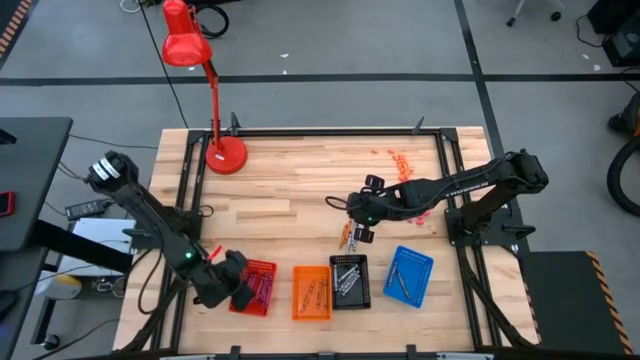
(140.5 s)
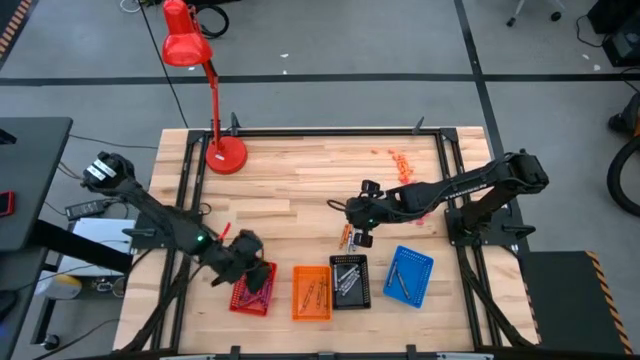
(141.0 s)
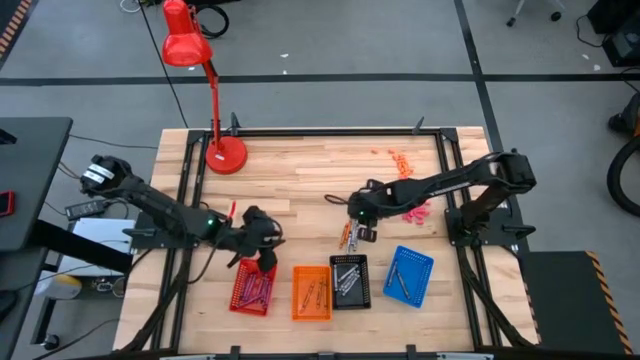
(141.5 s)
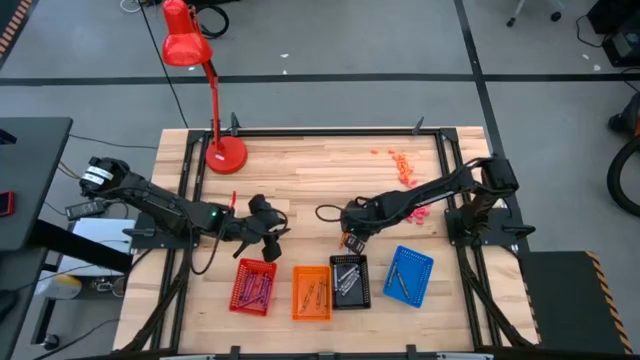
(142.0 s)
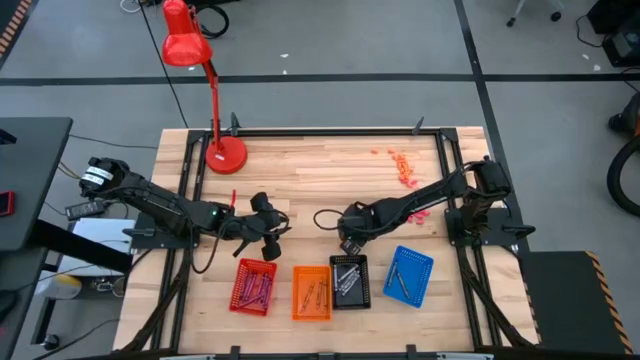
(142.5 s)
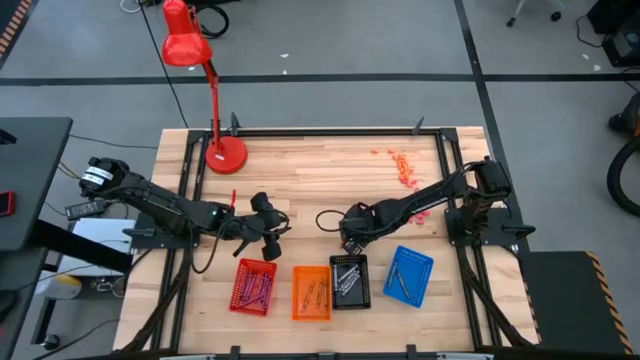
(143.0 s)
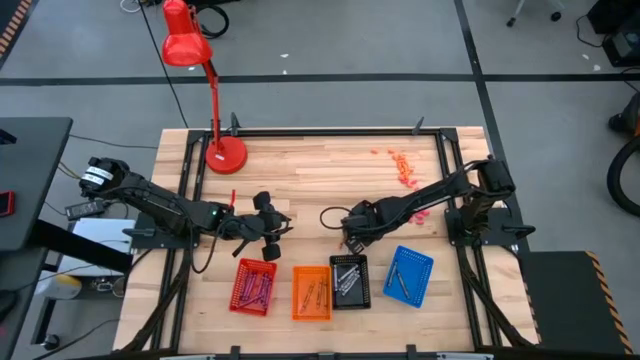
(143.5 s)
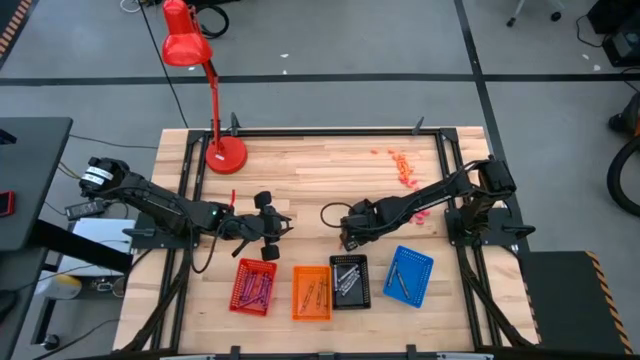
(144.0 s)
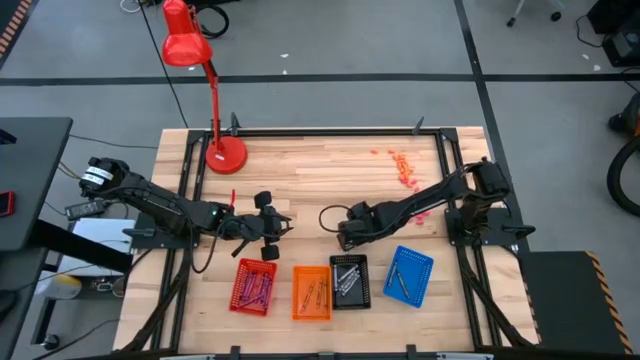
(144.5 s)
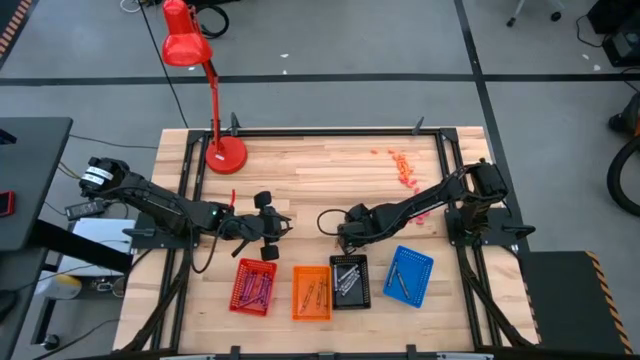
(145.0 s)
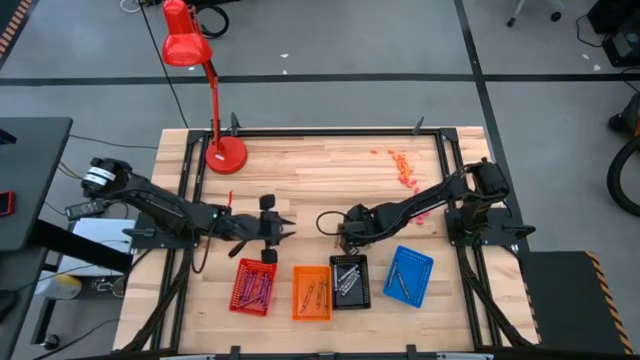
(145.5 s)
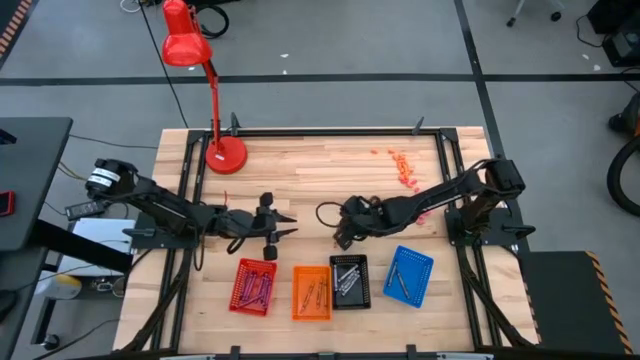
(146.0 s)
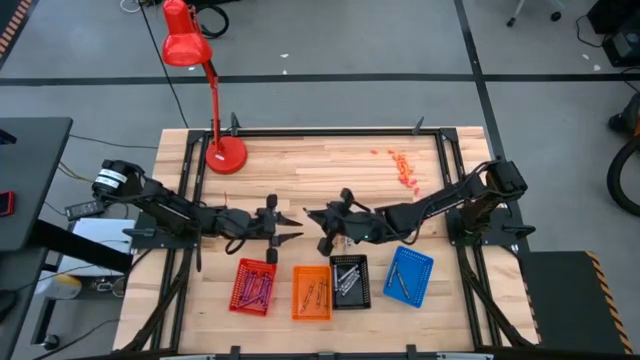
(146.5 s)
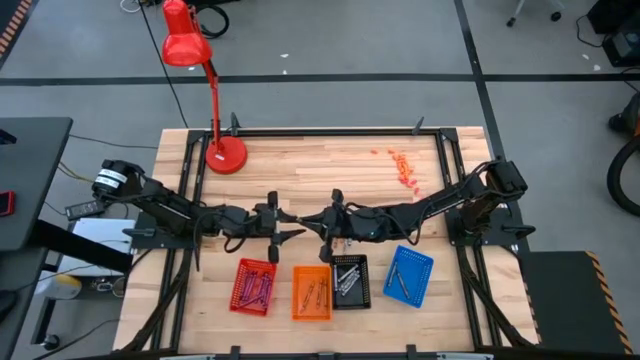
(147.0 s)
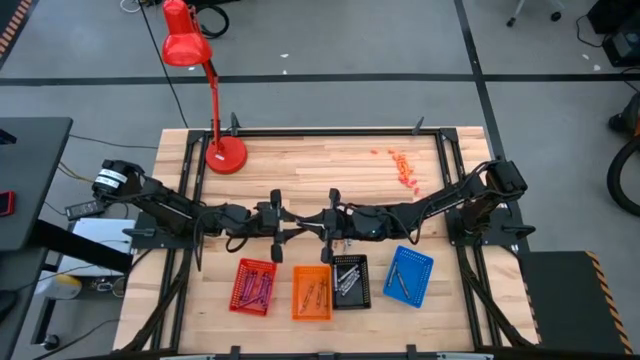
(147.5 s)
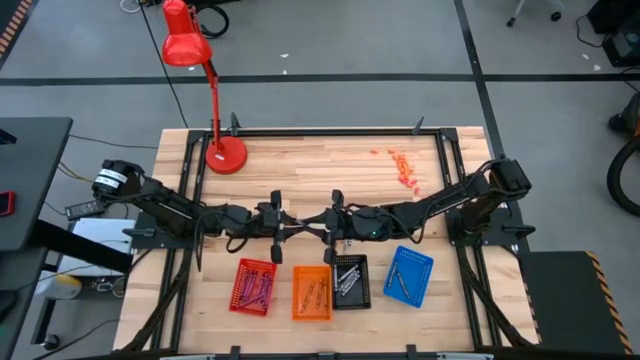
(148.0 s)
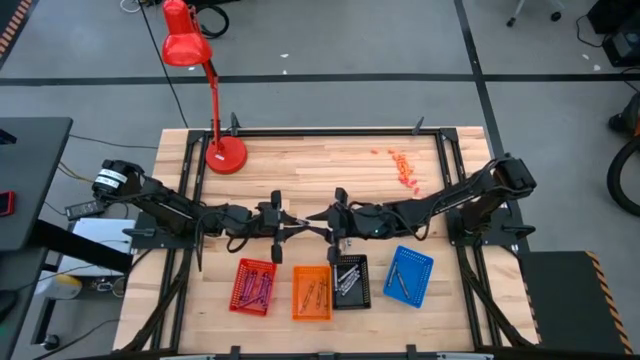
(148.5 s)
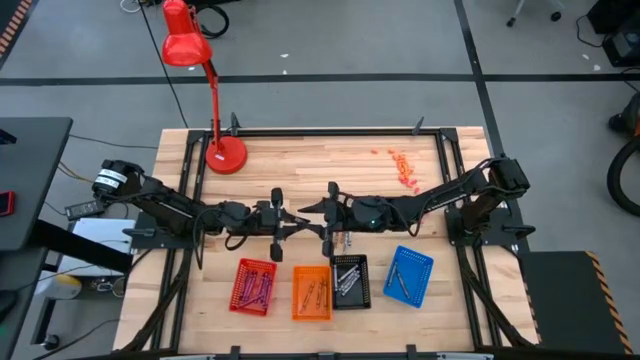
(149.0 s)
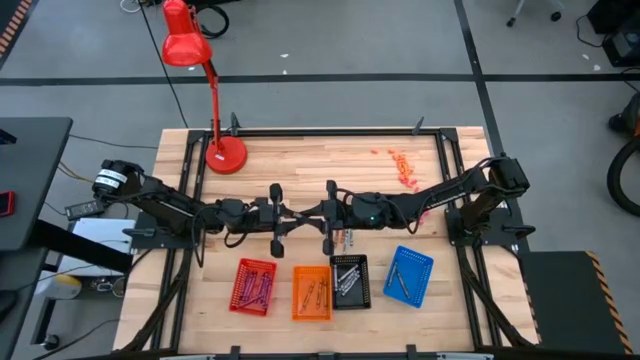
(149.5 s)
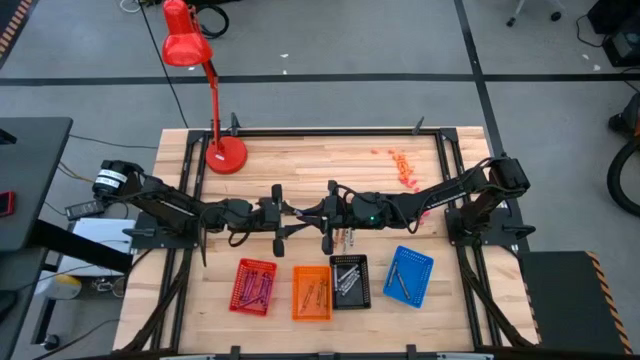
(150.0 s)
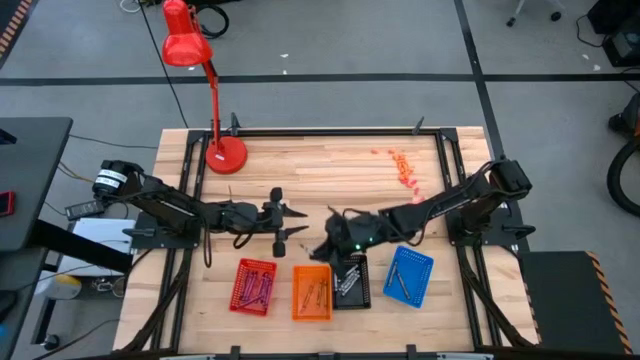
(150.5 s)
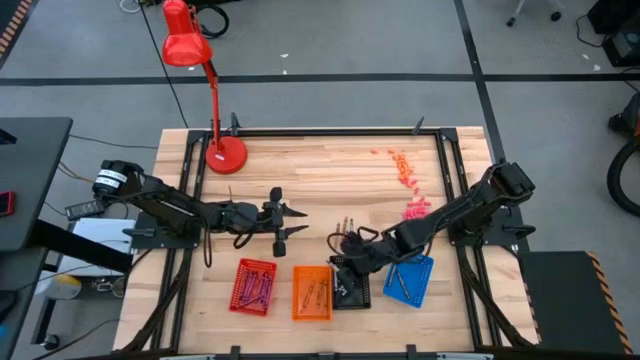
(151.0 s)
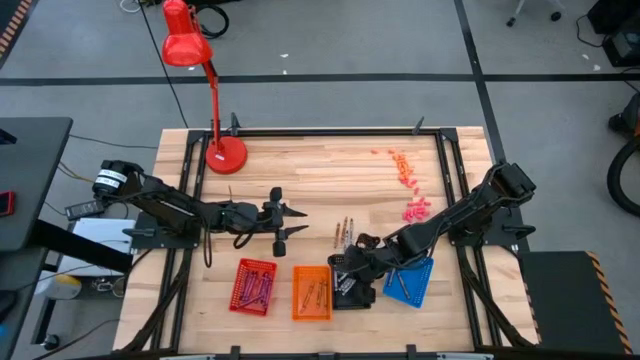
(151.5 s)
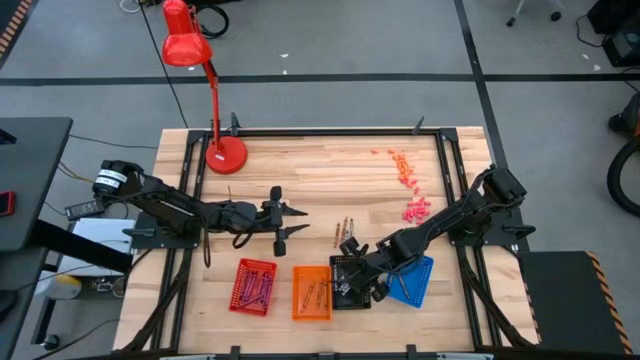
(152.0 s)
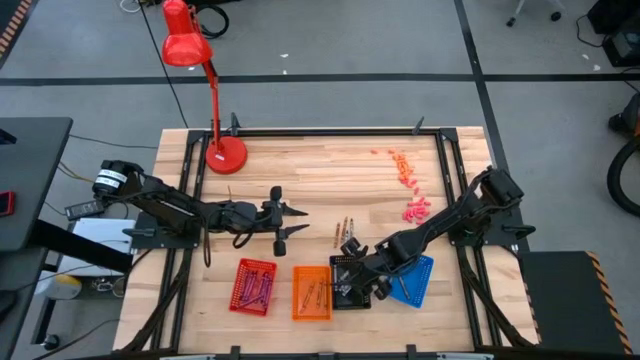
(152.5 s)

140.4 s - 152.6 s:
Task: Sort crayons
Put the black crayon into the black bin

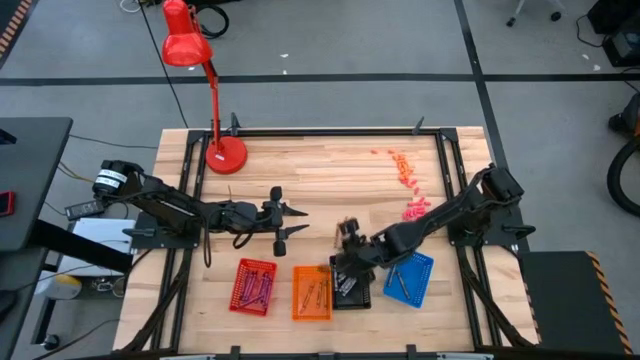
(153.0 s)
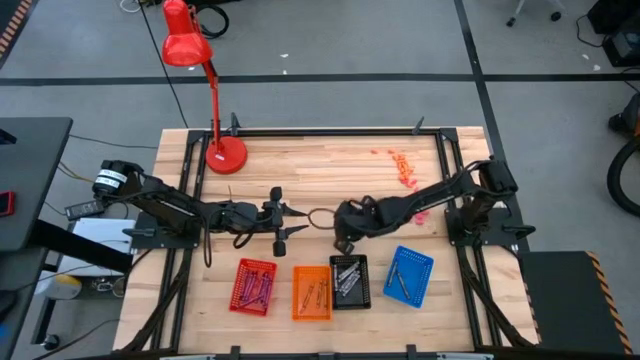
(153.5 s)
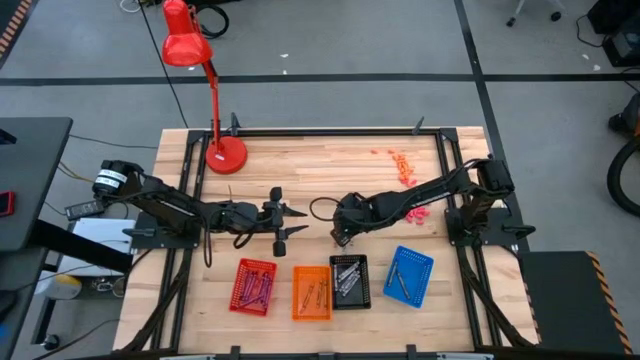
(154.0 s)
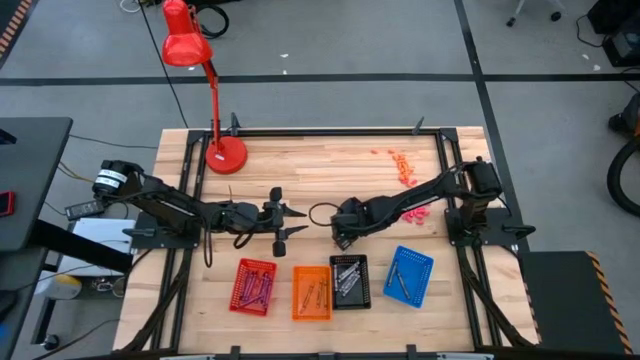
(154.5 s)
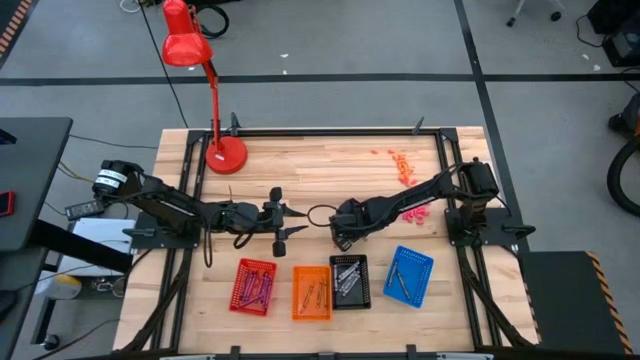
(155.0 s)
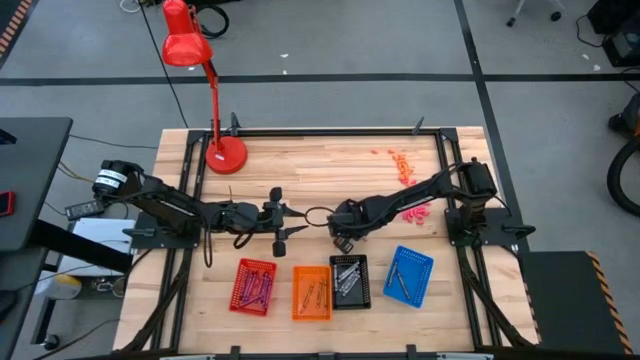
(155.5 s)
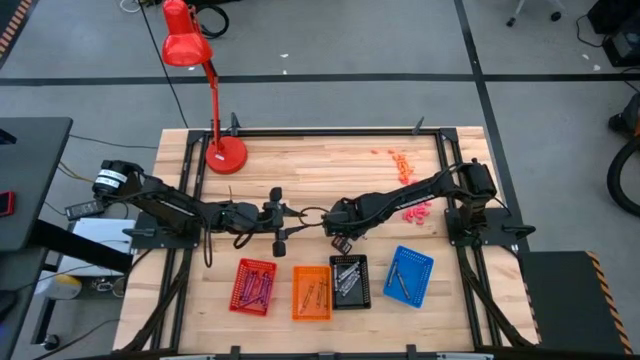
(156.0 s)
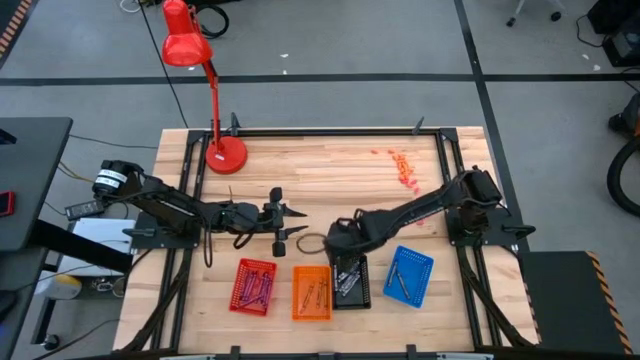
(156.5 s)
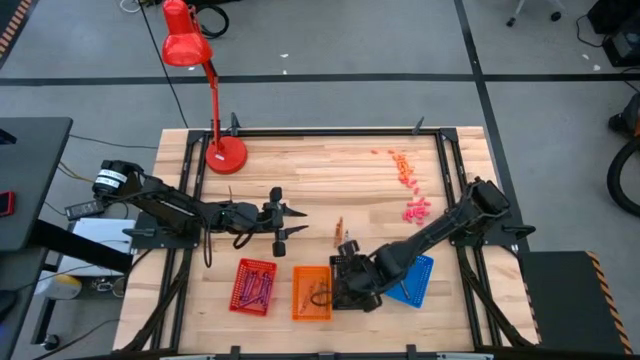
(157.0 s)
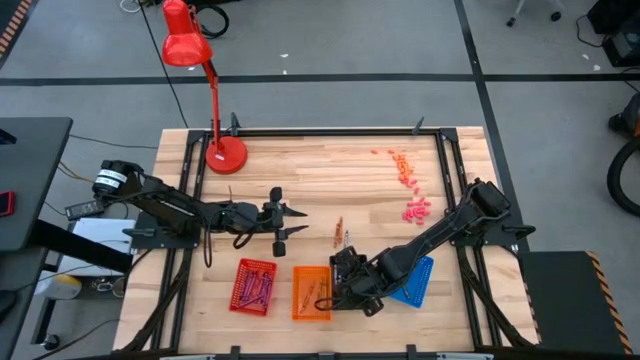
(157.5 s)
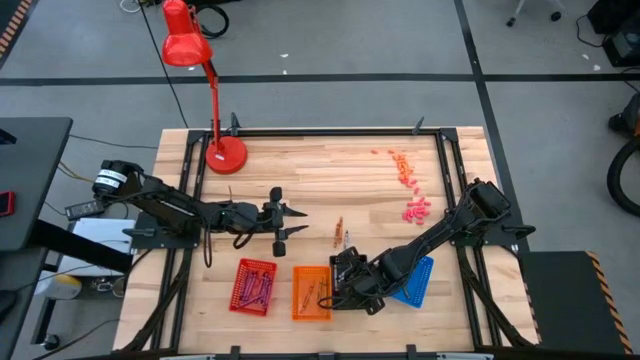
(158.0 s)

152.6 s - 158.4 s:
Put the black crayon into the black bin

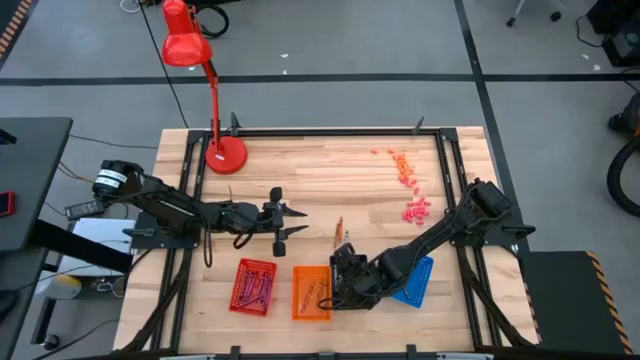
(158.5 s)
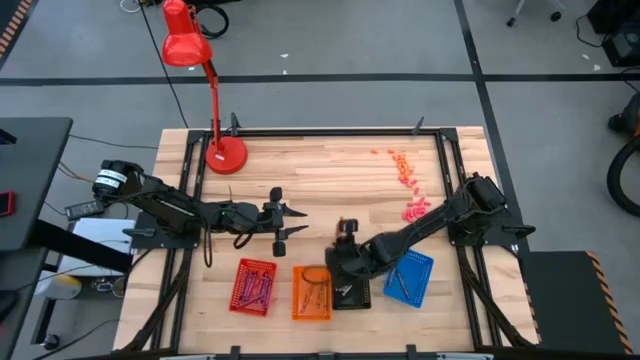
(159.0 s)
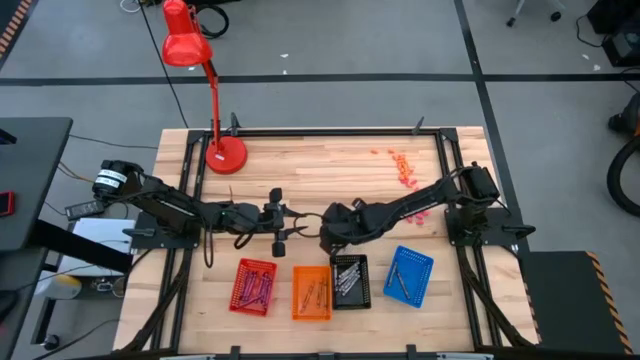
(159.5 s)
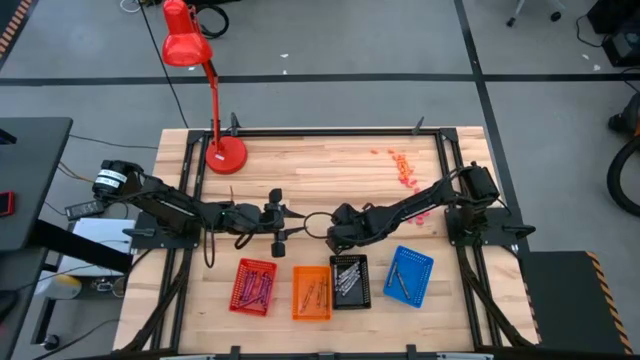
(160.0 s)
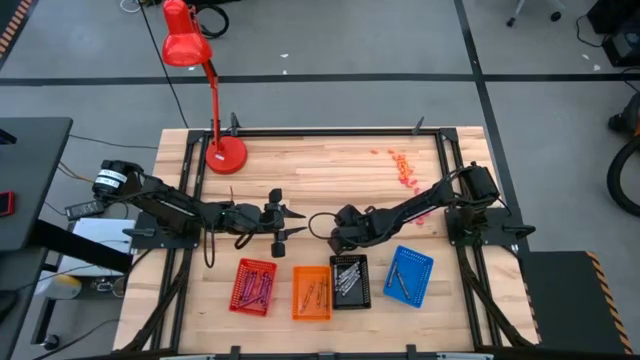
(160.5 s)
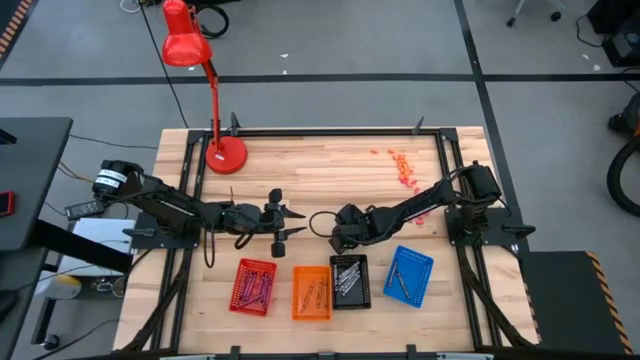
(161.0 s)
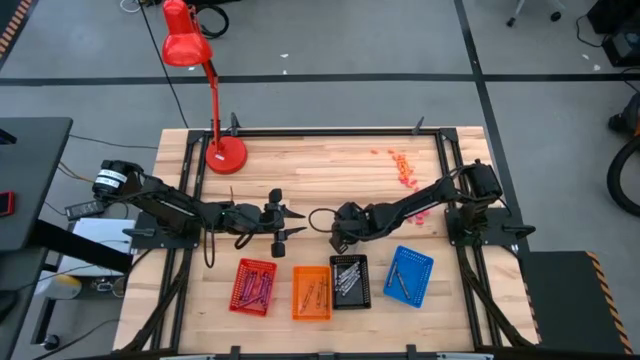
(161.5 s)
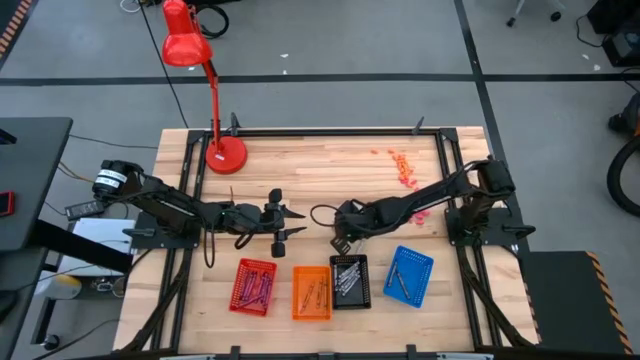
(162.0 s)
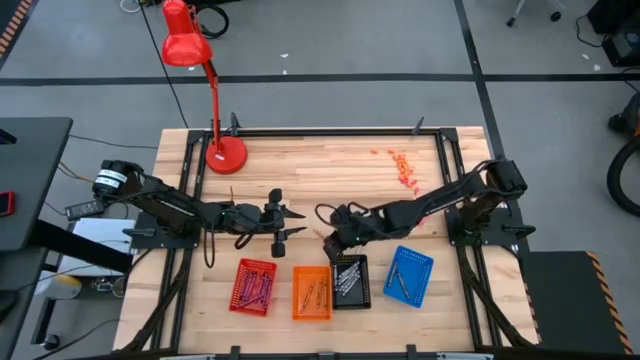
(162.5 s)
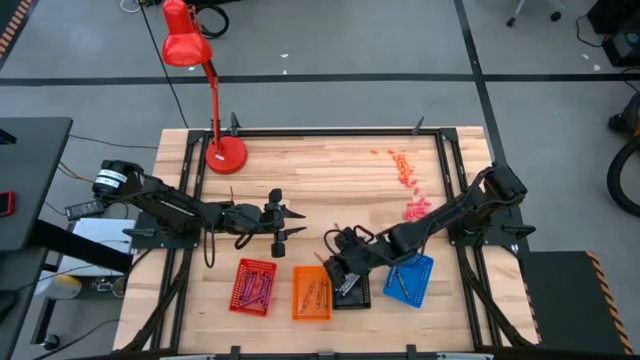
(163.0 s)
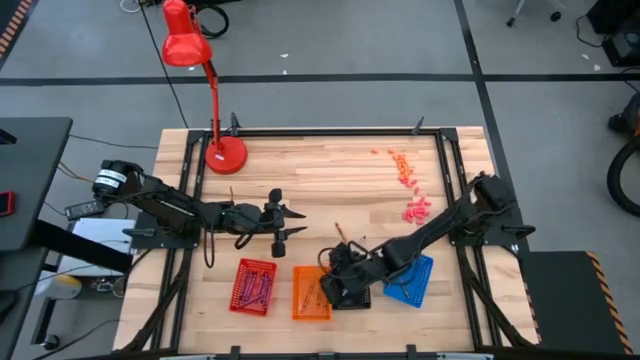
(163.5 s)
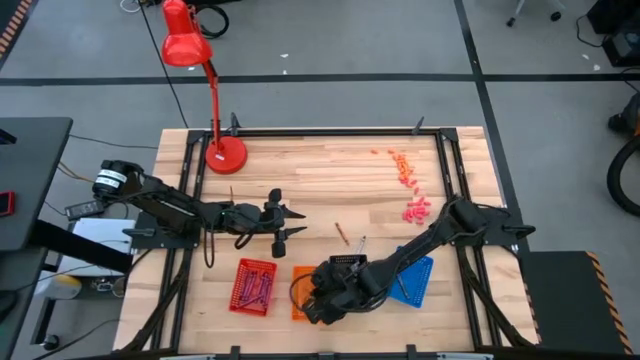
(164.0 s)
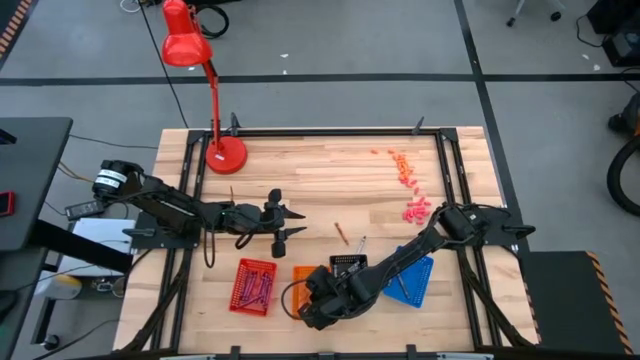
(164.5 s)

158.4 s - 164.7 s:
Put the orange crayon into the orange bin
